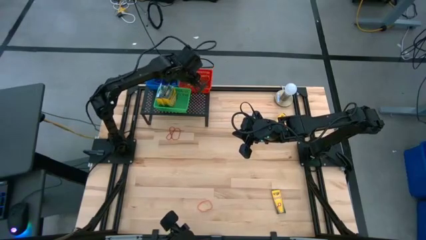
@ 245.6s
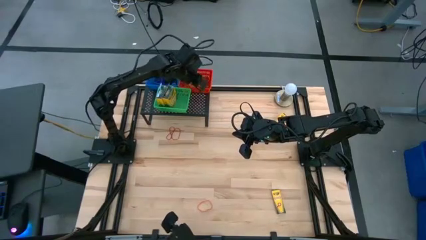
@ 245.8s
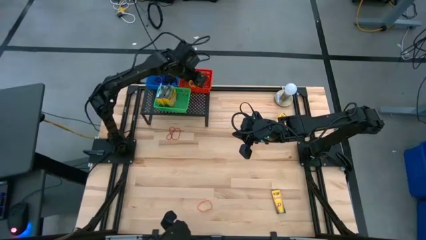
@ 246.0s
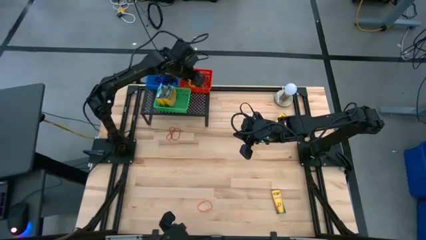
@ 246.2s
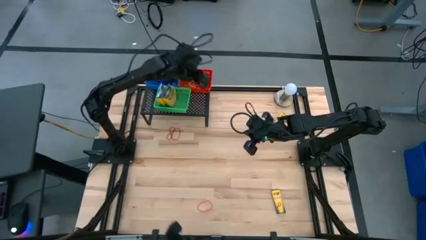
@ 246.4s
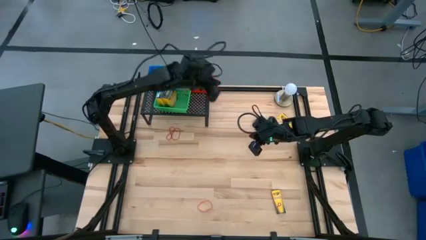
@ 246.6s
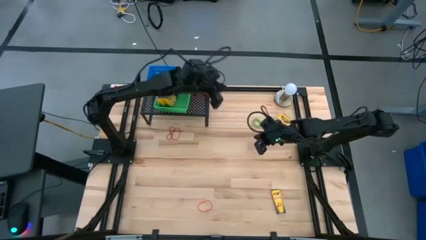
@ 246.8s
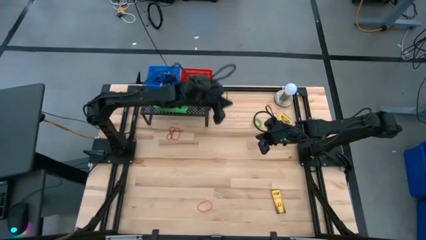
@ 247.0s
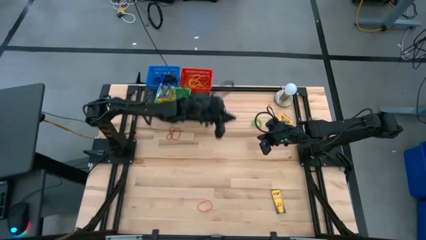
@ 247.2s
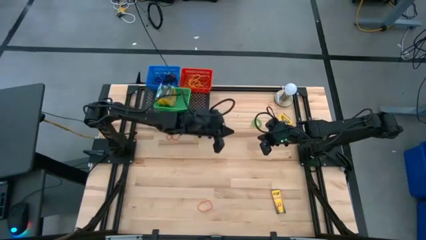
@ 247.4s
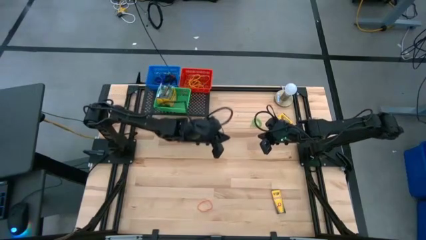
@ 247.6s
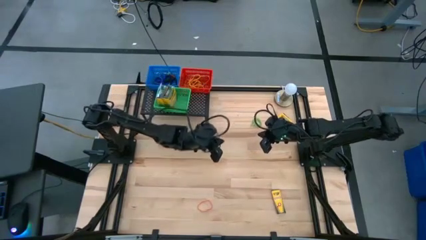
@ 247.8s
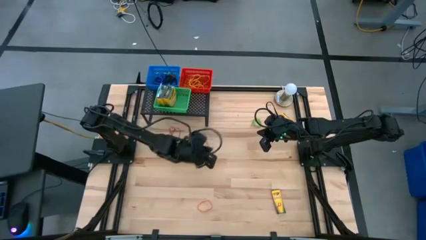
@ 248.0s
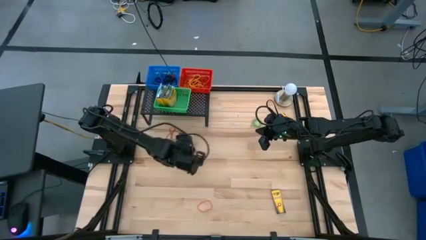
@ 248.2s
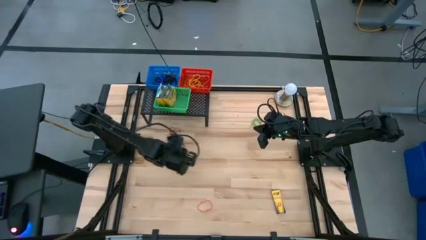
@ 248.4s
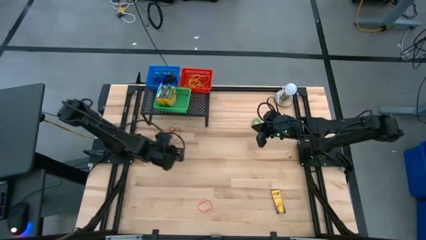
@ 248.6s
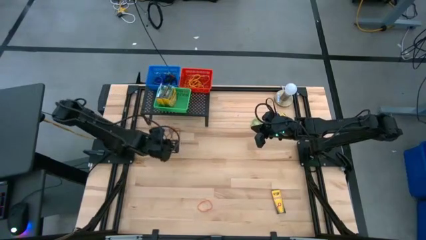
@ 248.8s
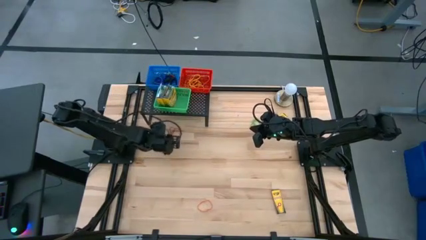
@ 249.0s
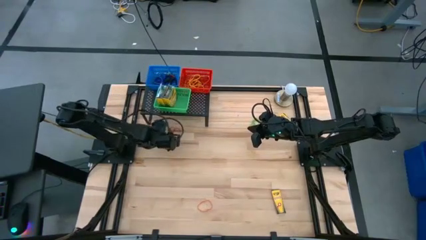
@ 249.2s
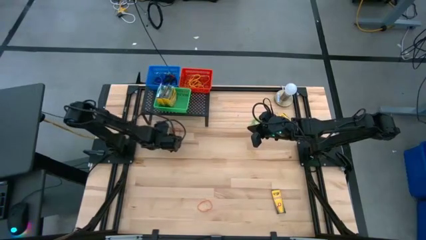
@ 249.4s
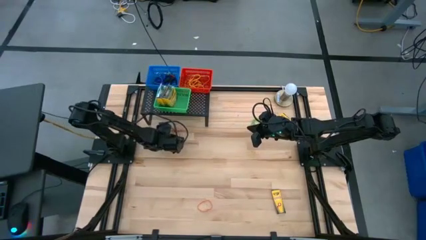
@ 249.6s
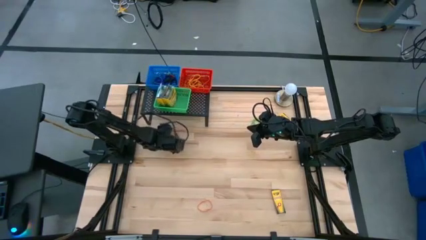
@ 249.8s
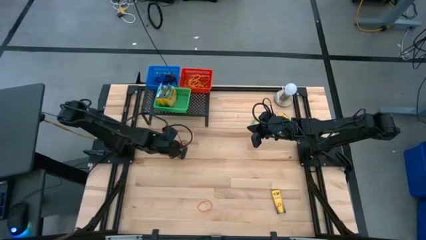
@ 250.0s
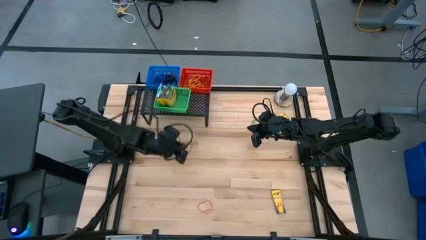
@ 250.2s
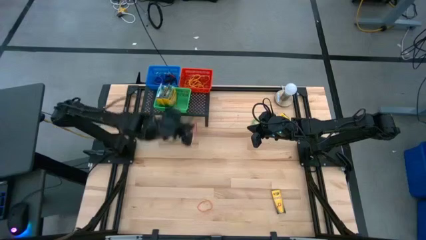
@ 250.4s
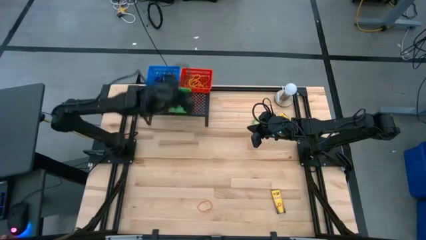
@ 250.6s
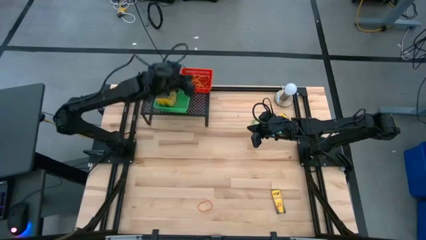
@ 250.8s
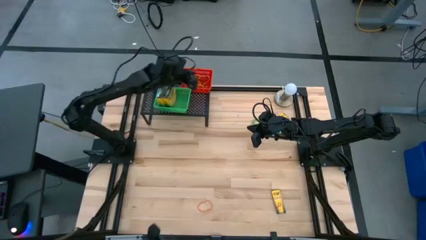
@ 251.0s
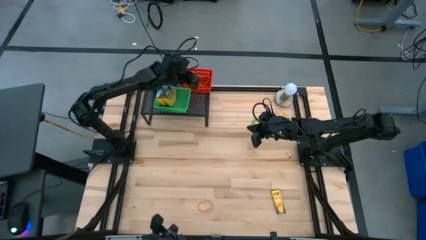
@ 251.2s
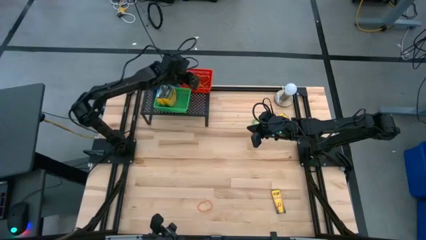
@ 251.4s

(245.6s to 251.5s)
Task: Pick & Place Office Desk Supplies
Put the red rubber band into the red bin

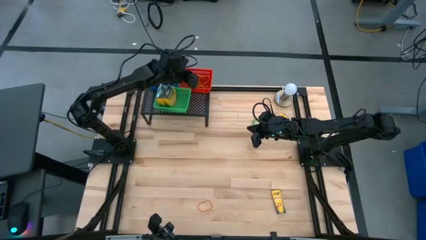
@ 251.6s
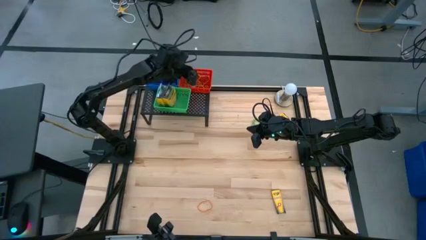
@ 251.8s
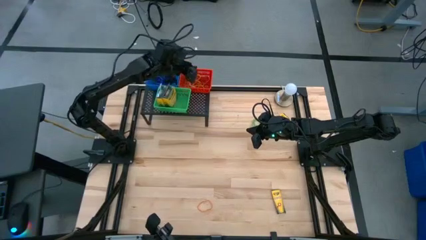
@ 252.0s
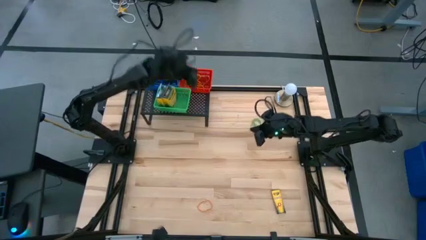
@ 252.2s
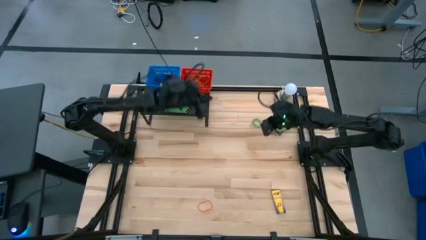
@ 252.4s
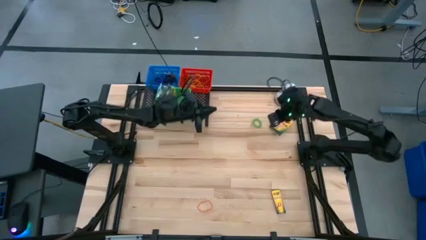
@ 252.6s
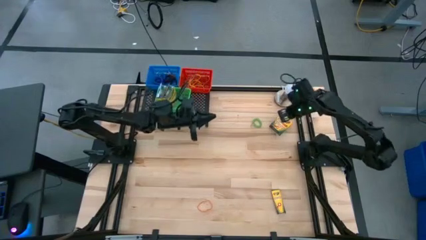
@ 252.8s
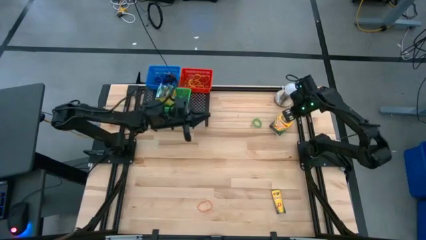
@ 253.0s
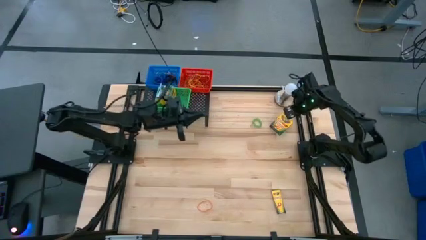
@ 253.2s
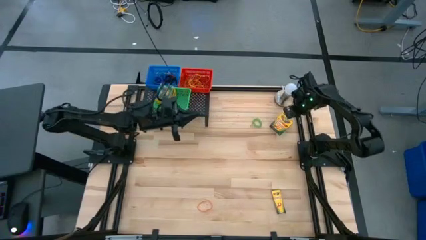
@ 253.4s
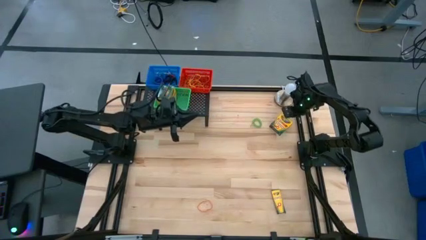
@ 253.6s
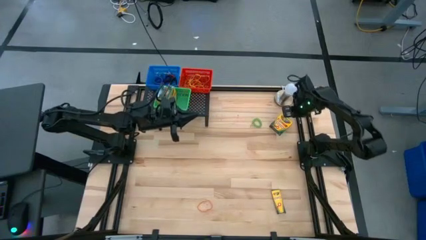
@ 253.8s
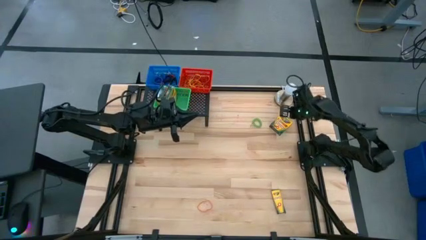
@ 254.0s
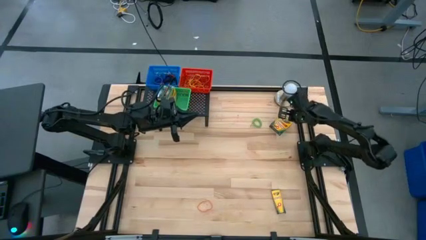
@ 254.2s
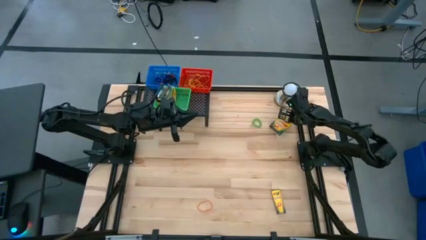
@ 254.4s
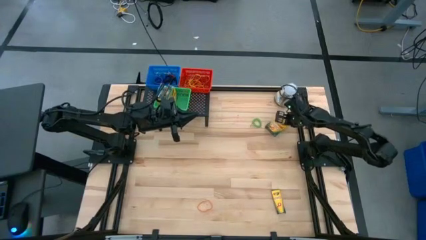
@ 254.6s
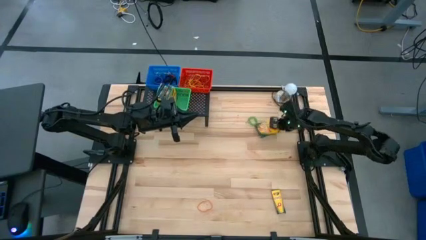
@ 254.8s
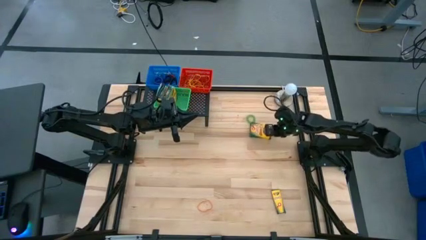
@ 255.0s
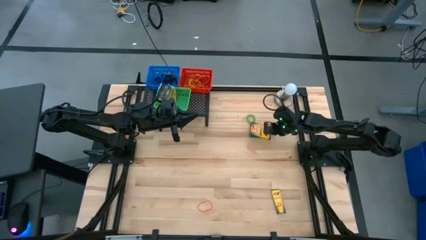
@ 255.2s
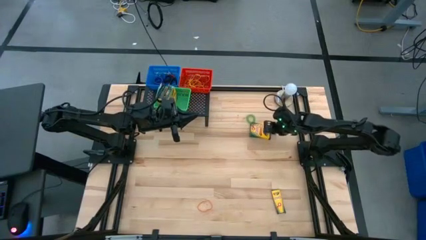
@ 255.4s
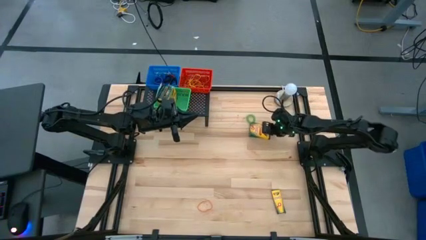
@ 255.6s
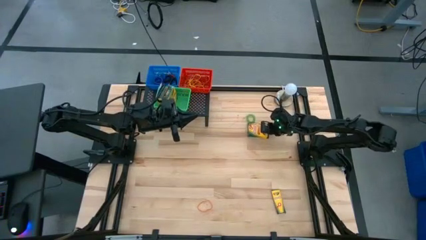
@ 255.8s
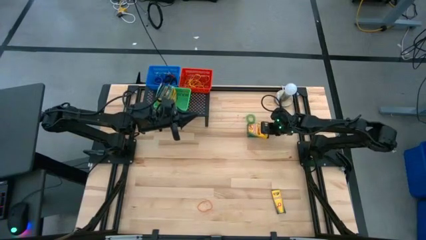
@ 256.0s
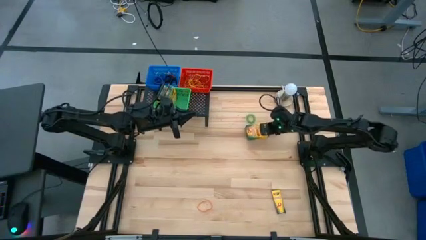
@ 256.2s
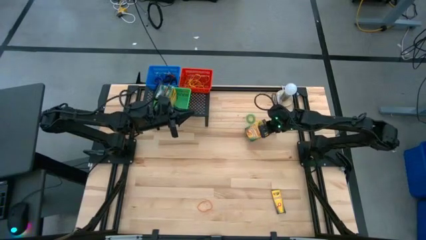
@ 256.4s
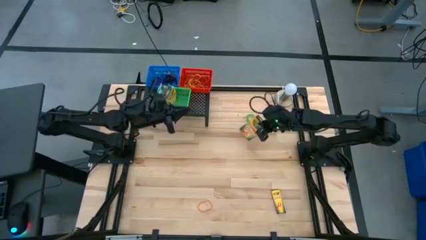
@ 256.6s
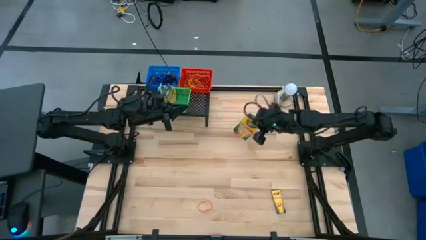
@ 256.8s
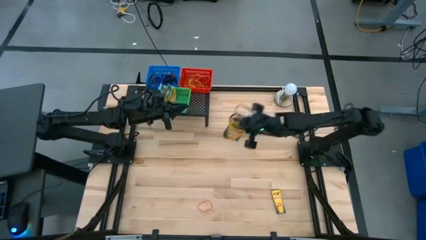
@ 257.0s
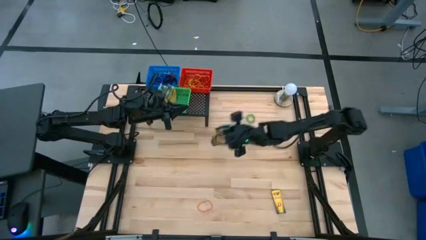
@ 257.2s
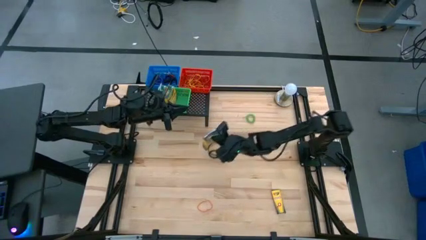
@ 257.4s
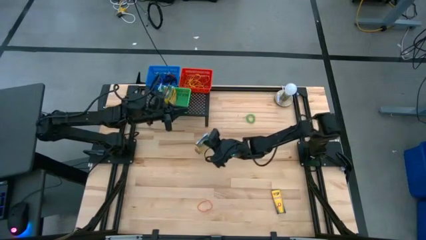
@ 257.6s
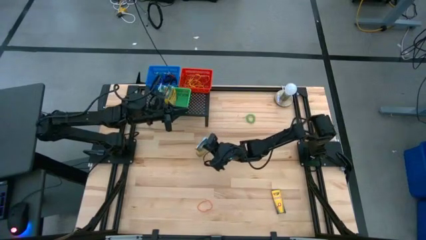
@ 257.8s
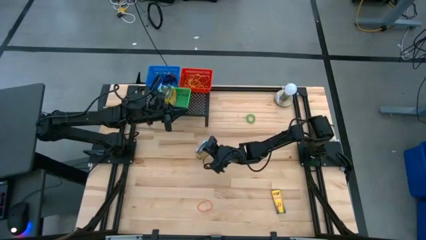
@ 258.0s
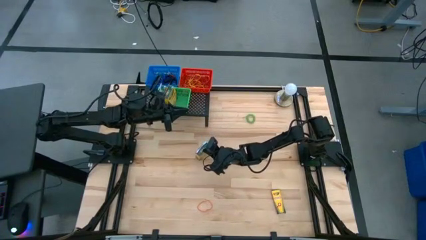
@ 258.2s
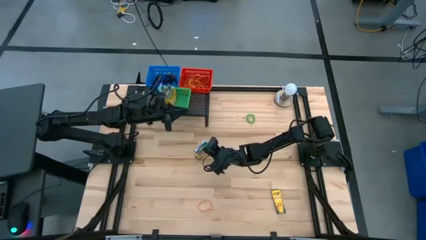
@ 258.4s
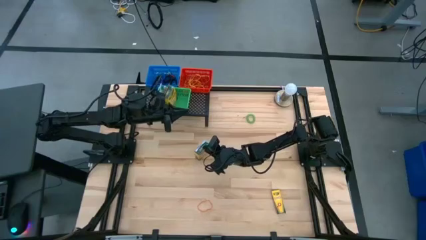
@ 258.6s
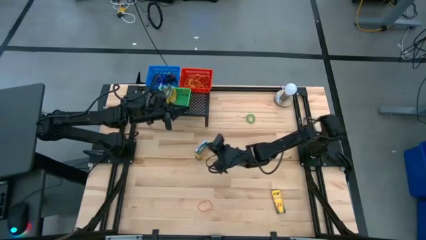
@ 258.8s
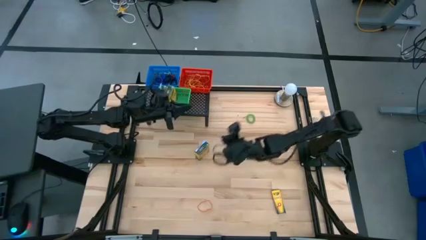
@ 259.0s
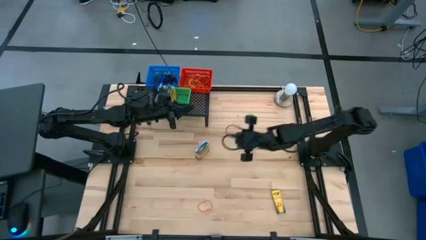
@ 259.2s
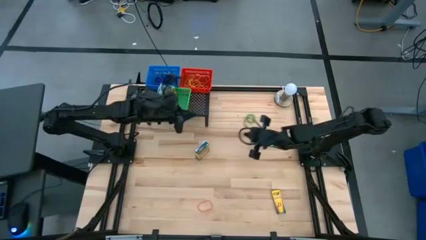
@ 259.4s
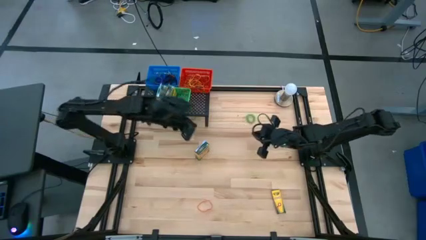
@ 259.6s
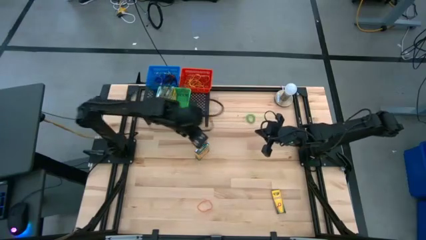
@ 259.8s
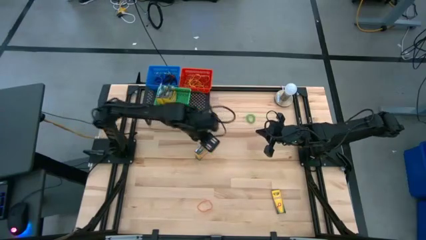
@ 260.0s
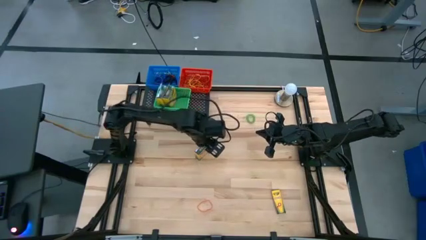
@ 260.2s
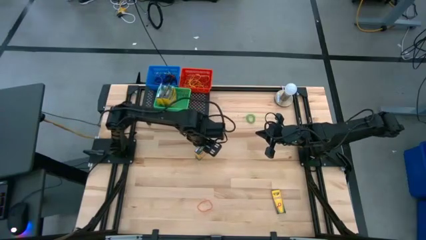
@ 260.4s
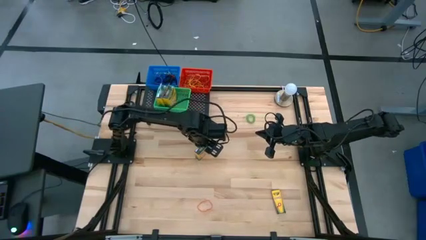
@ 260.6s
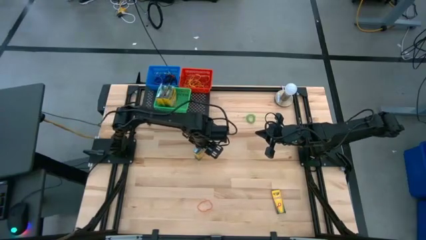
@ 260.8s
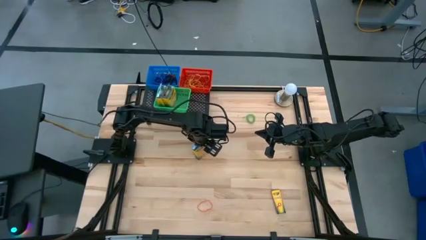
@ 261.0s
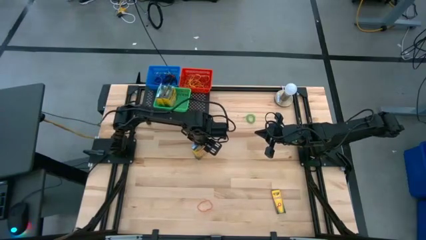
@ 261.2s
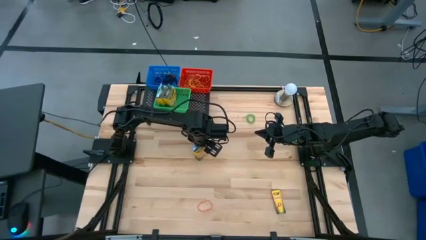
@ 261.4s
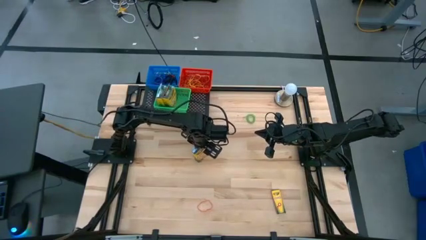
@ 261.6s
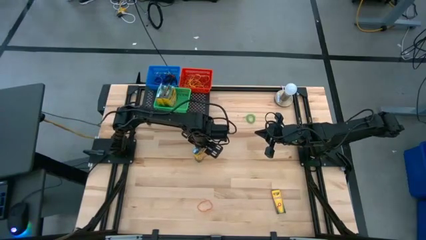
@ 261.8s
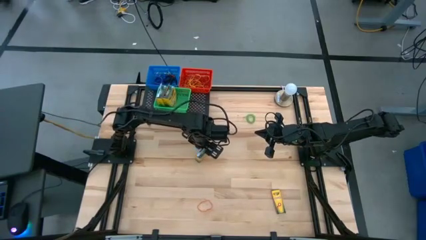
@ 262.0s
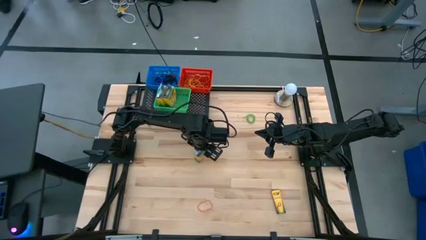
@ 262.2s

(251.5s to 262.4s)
Put the crayon box into the the green bin
